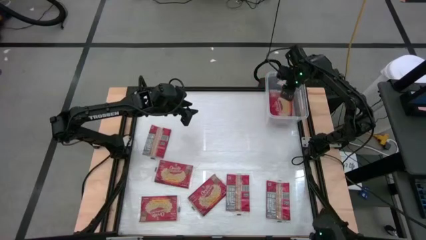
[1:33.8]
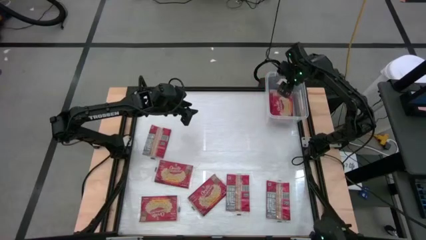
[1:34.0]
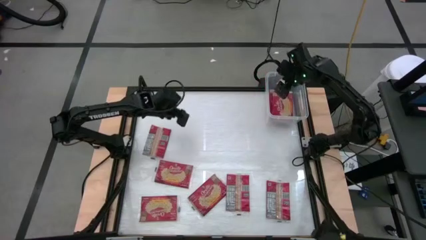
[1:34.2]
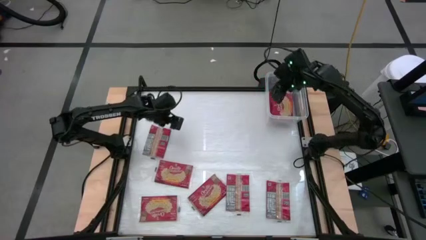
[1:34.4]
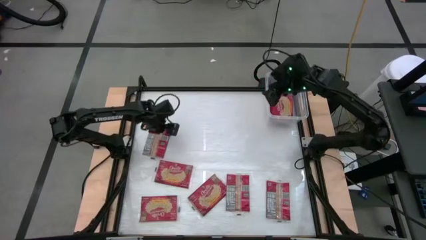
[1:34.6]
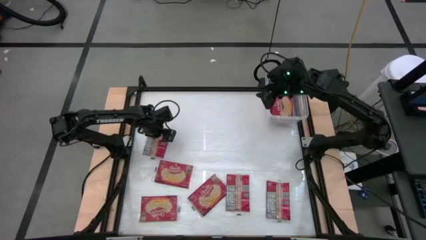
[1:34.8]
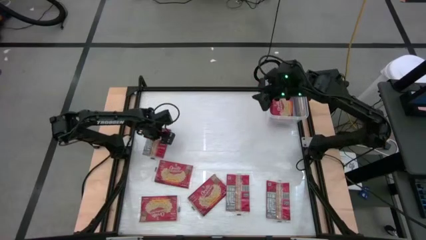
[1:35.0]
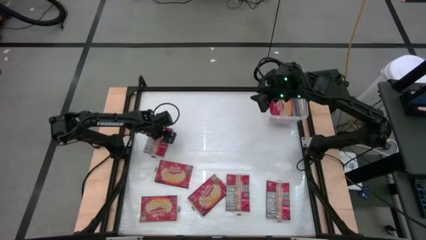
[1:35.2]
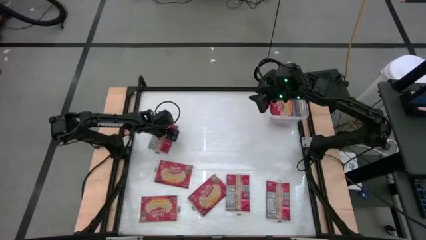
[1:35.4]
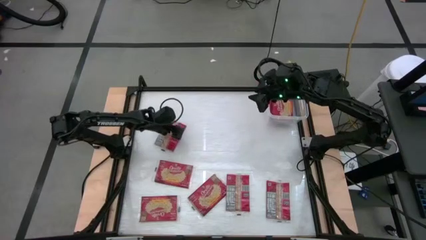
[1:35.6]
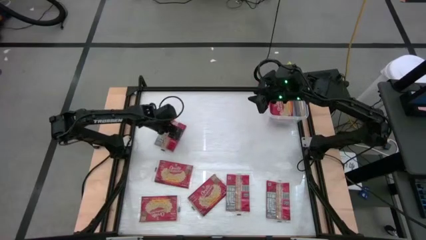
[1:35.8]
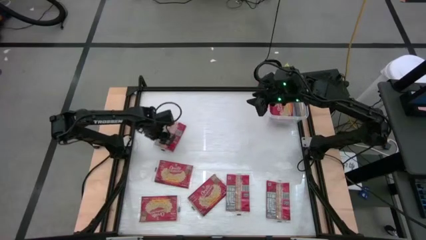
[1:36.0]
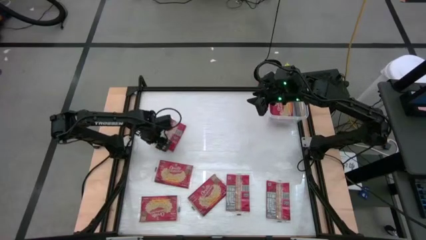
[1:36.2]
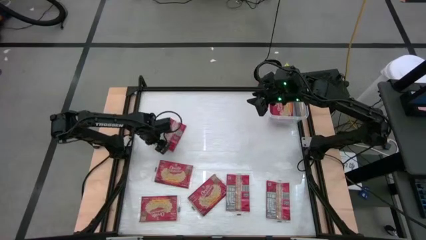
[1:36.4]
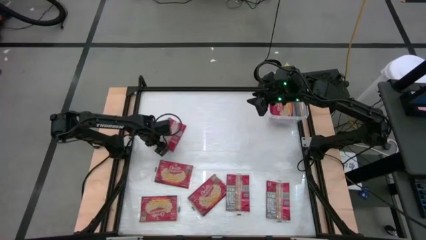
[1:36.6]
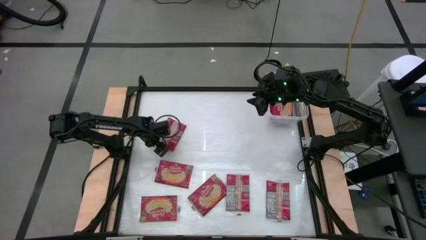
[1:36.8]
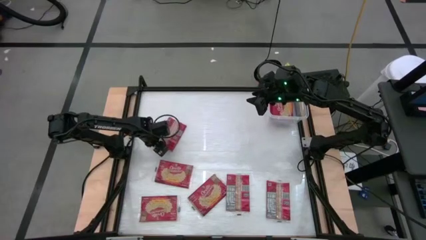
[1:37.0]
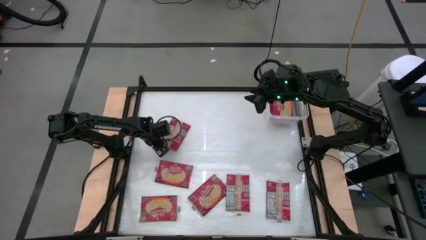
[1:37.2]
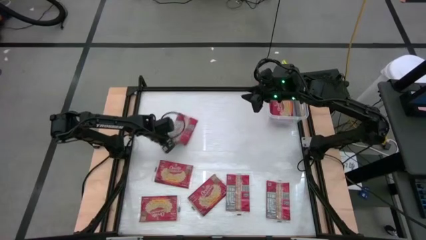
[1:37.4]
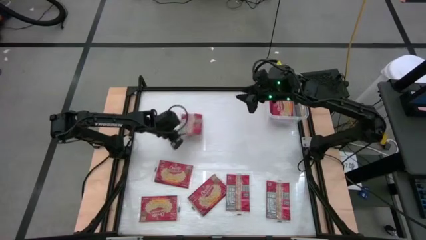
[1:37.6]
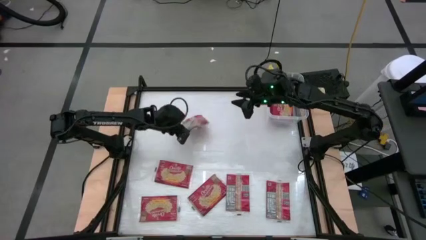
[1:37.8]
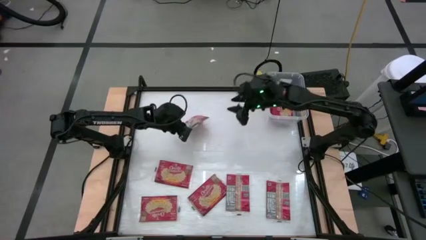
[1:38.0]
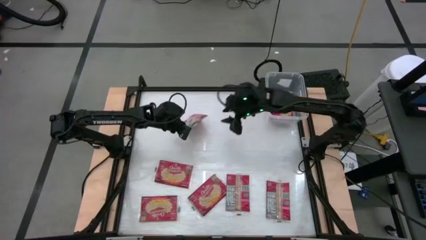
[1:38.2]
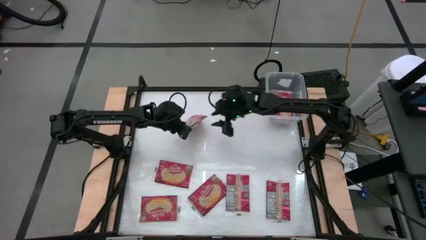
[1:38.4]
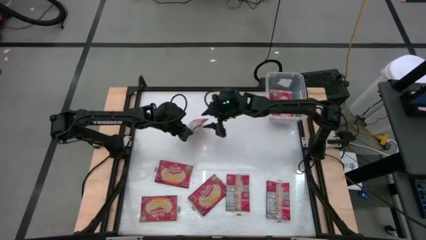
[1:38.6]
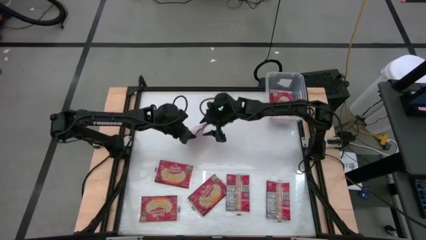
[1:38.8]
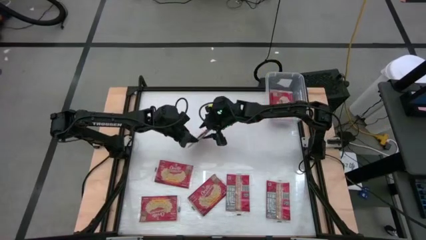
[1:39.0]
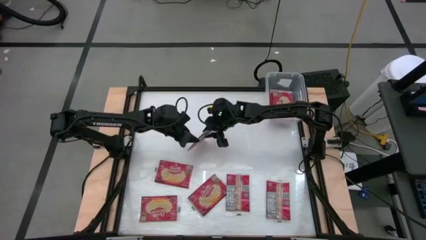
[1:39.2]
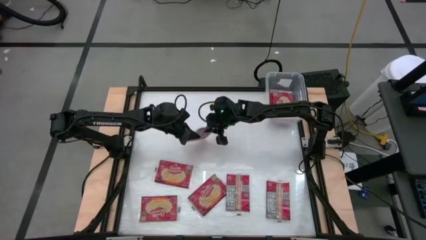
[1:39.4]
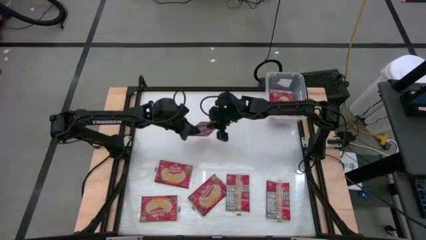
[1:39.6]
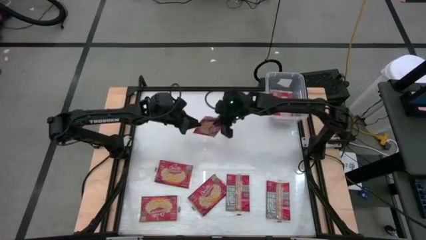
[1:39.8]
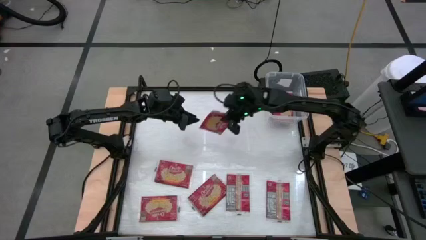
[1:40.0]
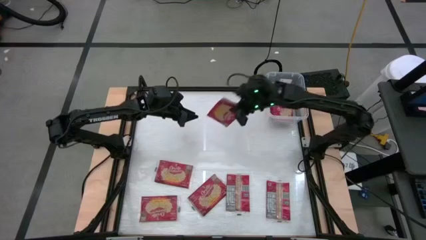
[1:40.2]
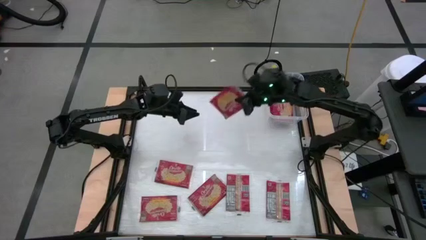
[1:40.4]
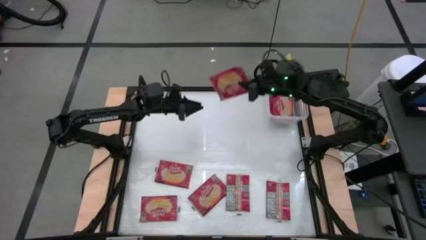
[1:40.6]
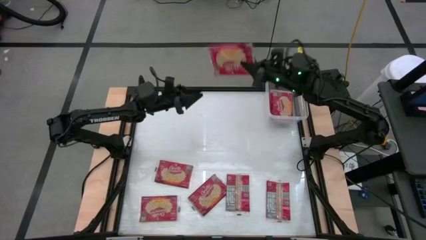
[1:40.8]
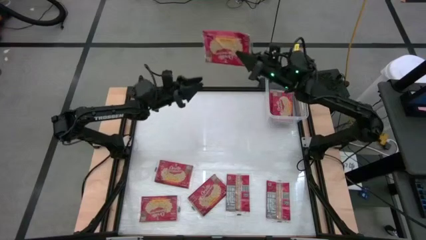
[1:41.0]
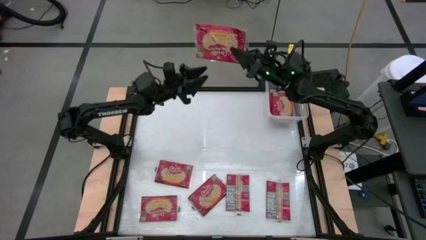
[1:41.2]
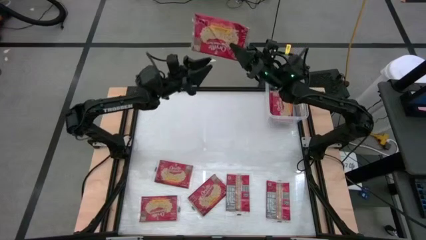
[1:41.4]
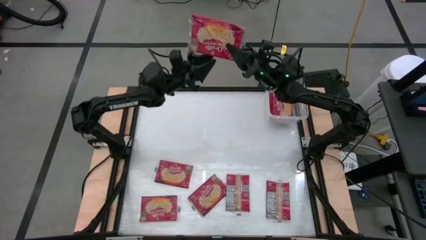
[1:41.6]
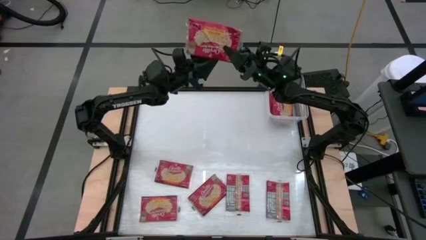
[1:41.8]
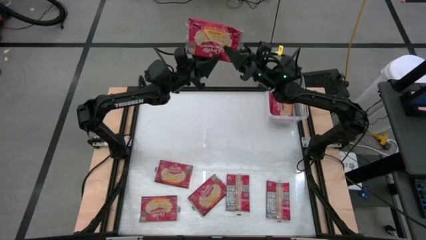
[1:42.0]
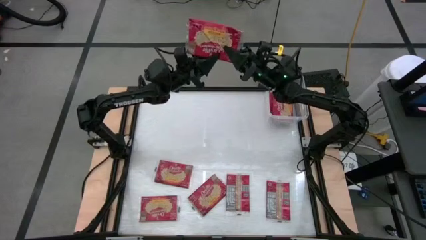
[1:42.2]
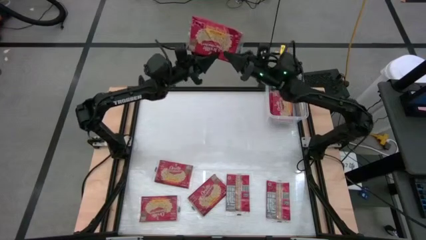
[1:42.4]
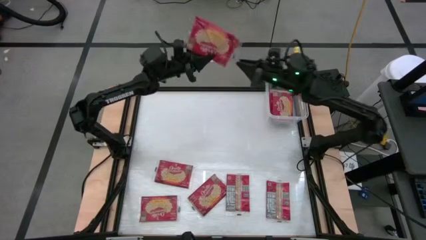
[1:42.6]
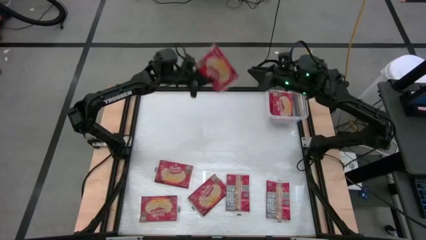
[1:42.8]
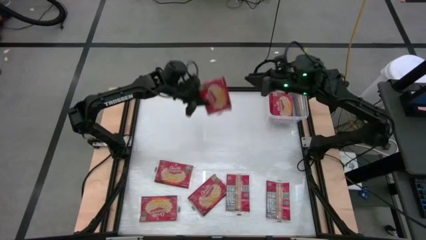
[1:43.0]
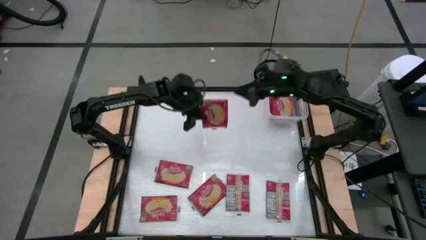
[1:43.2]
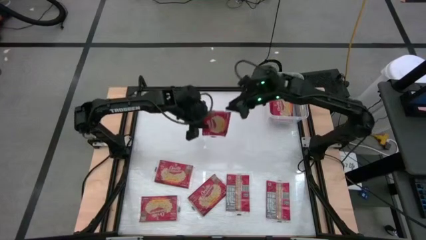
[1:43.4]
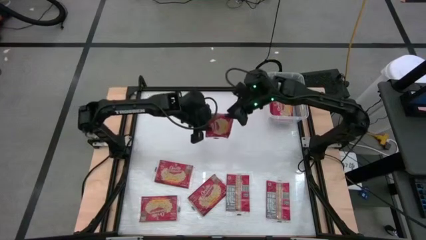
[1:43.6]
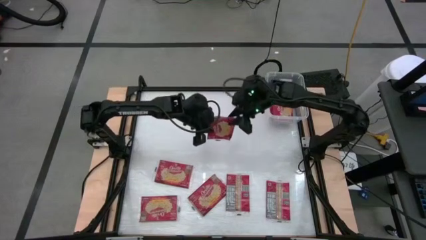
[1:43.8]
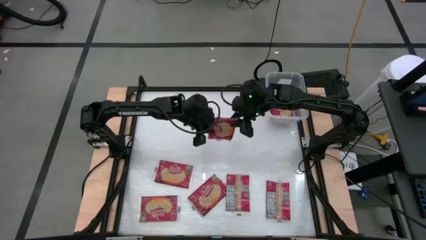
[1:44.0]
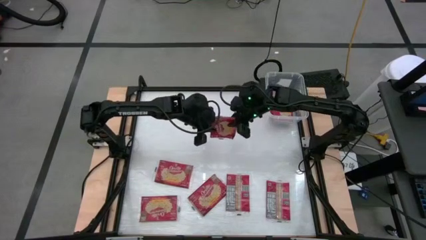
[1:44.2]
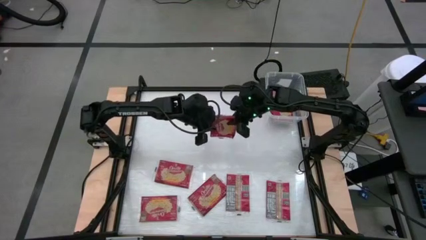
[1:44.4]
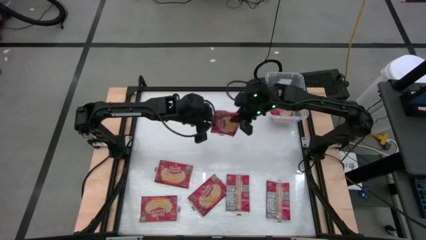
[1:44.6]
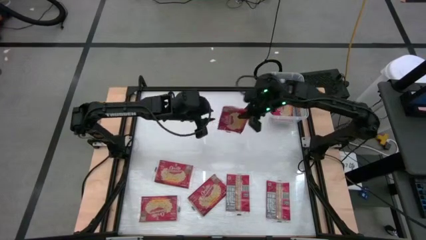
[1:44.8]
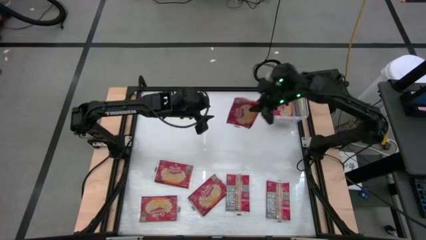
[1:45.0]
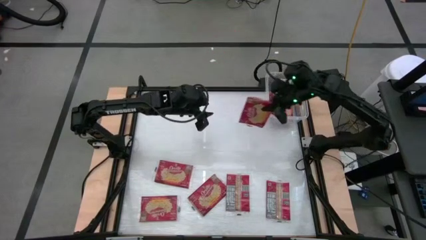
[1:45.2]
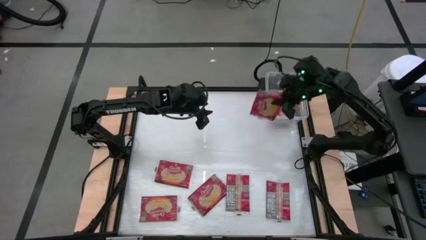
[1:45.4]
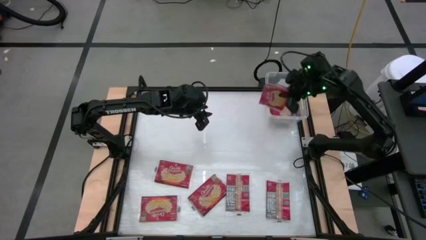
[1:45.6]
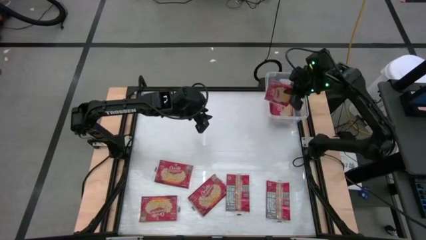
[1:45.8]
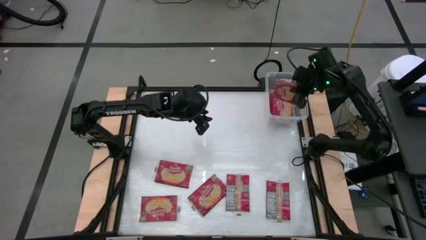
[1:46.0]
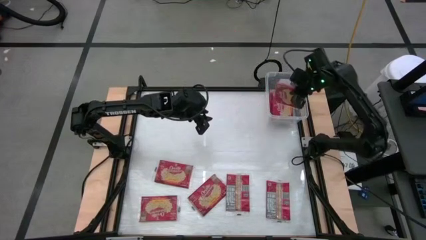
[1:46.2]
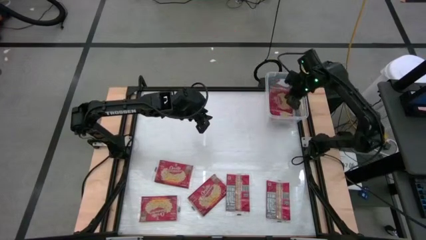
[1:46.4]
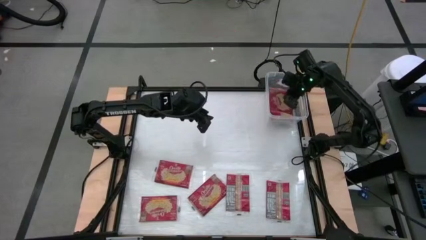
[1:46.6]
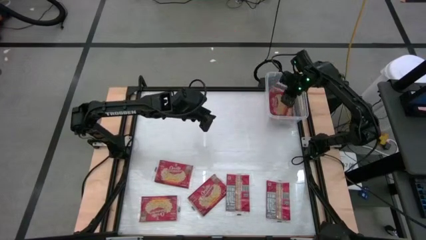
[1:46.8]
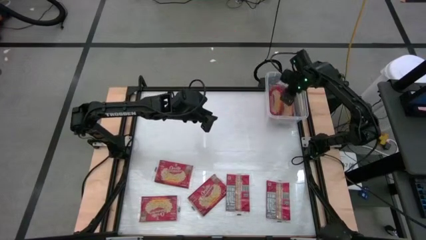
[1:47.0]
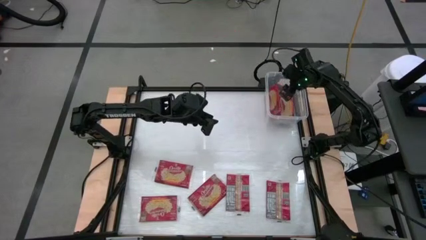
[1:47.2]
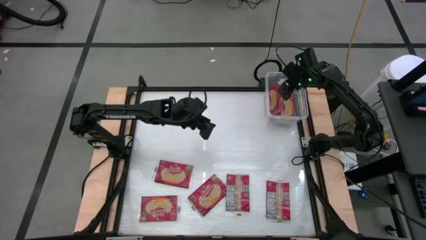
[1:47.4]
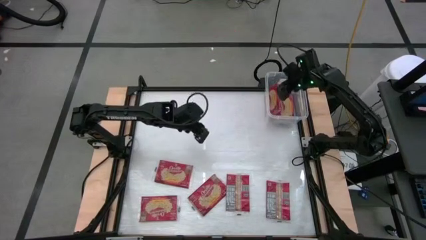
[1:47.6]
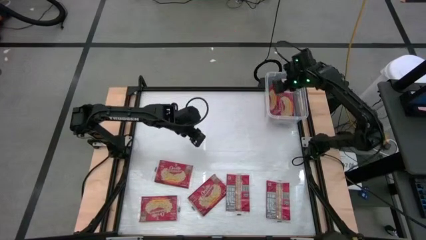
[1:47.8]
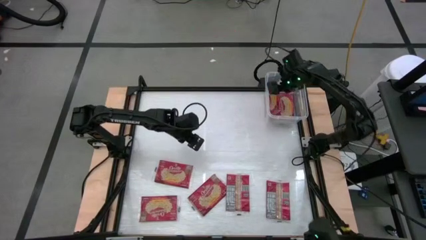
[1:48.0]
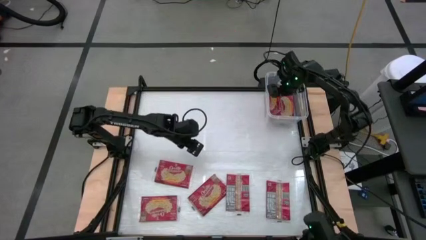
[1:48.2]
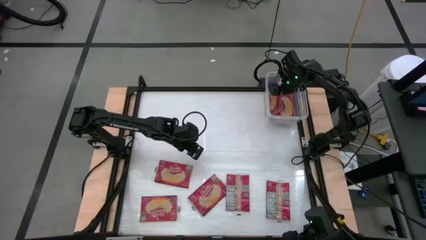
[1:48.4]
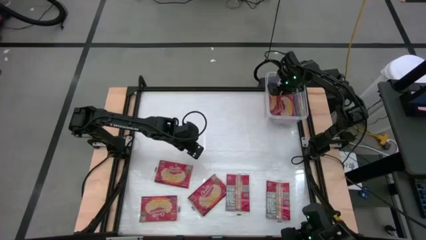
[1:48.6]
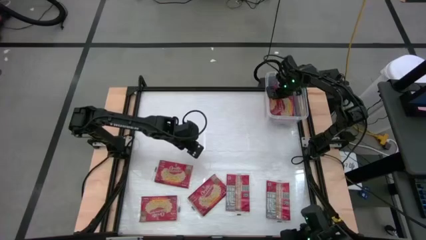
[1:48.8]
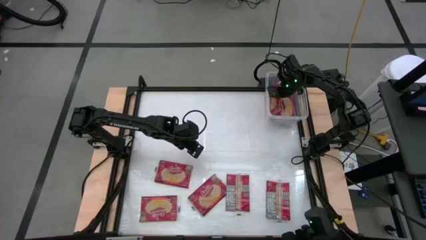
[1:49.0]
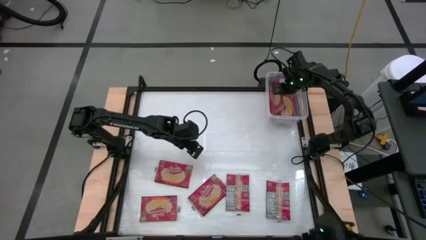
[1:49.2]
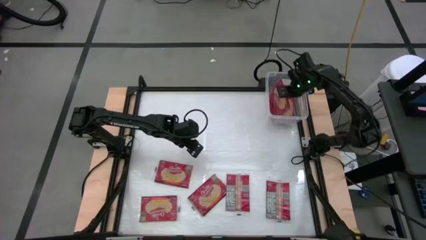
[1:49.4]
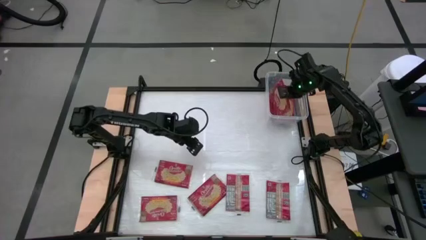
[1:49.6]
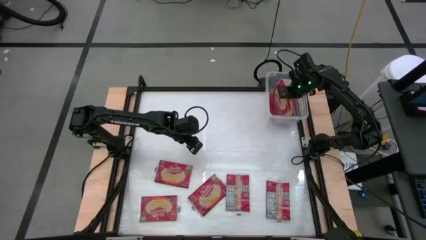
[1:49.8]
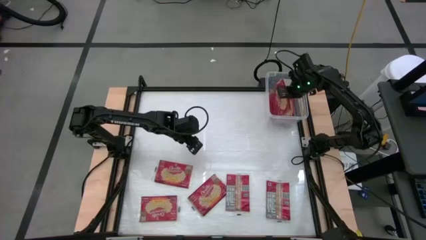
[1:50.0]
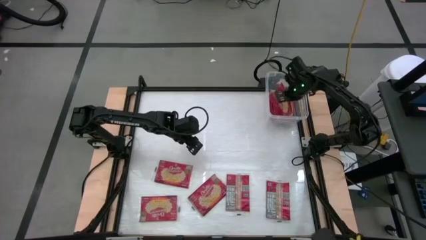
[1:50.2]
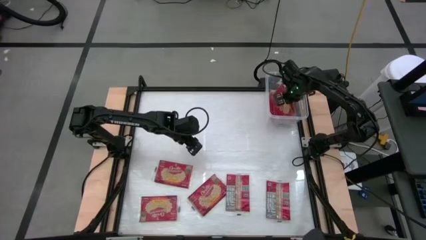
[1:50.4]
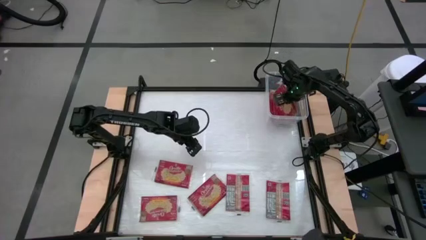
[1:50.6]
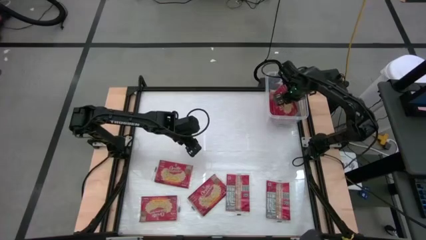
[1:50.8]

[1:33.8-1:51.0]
Task: Sort popcorn bags into baskets
Put the red popcorn bag into the transparent container
